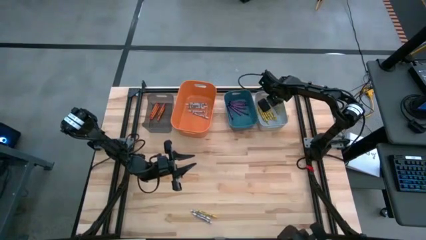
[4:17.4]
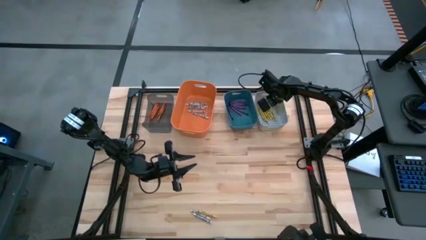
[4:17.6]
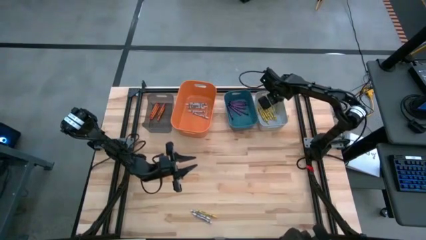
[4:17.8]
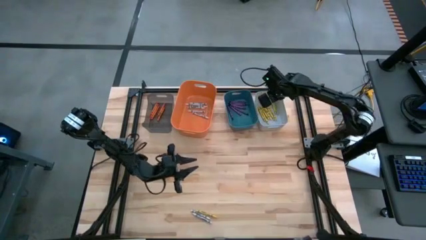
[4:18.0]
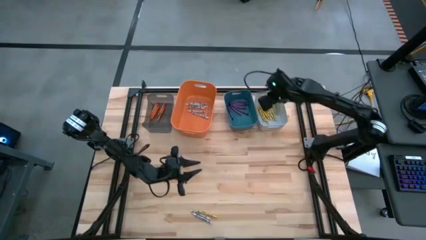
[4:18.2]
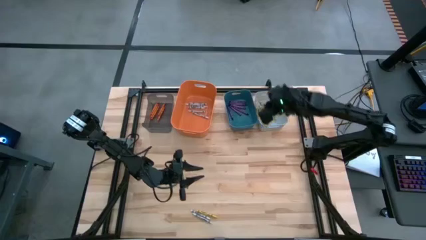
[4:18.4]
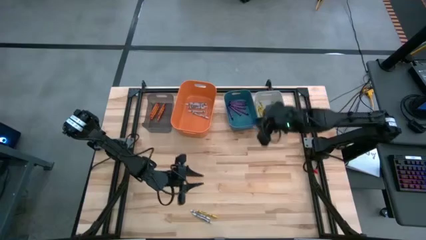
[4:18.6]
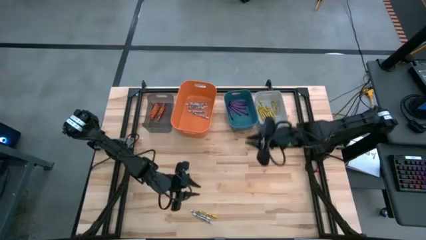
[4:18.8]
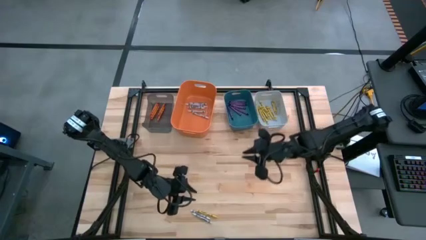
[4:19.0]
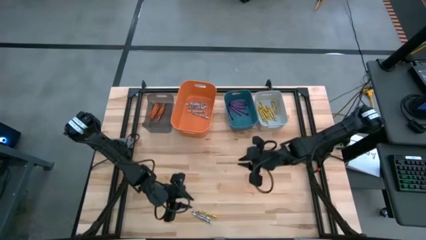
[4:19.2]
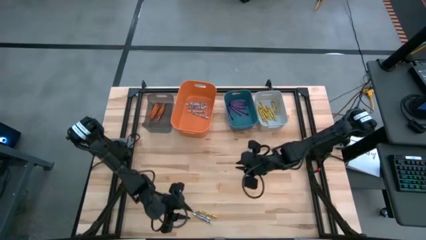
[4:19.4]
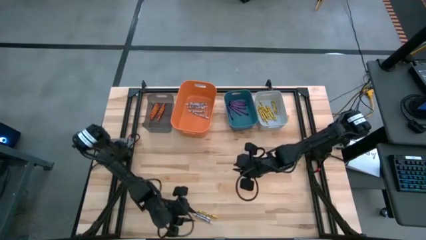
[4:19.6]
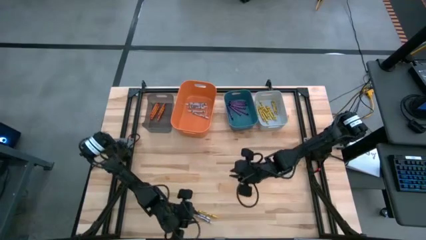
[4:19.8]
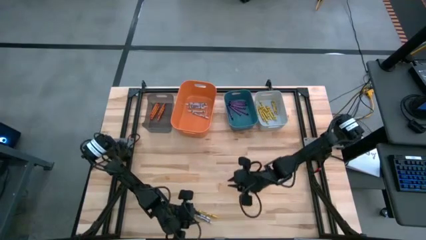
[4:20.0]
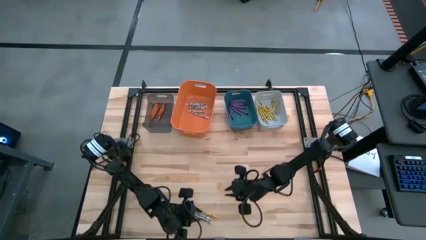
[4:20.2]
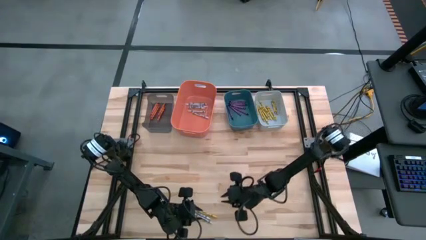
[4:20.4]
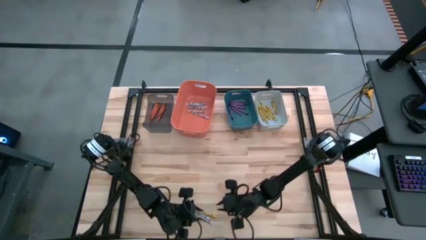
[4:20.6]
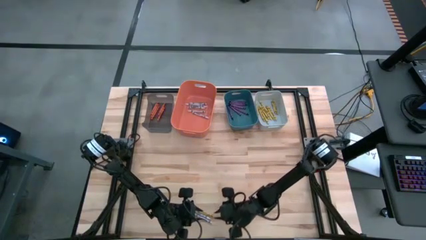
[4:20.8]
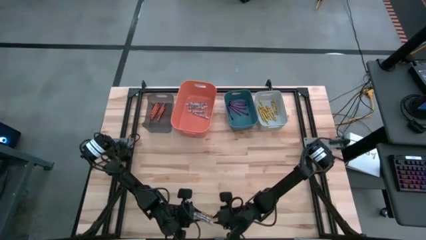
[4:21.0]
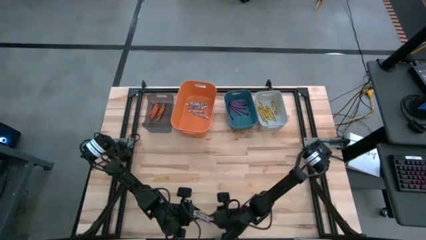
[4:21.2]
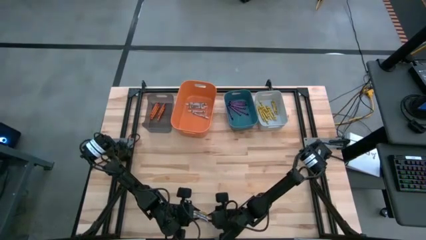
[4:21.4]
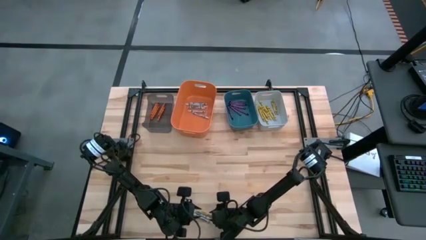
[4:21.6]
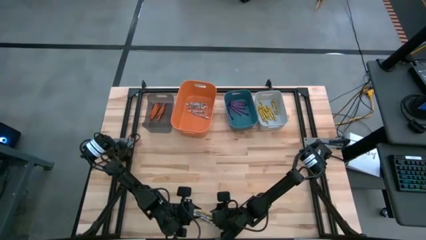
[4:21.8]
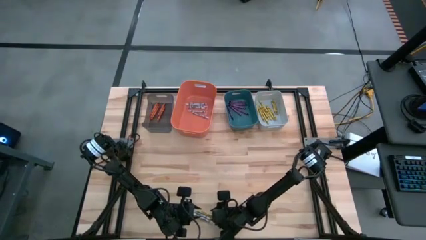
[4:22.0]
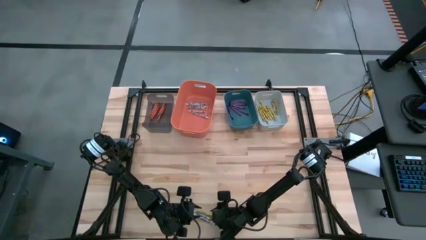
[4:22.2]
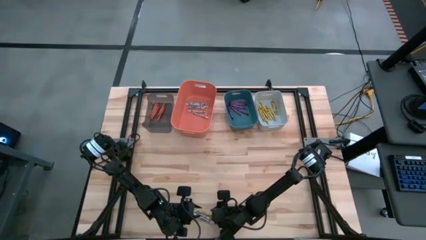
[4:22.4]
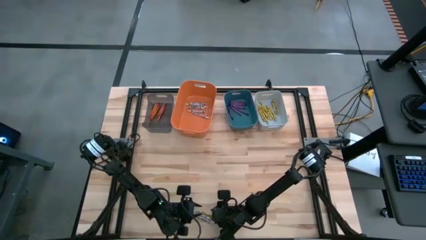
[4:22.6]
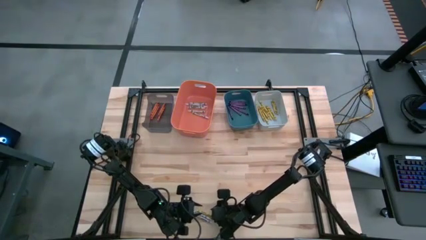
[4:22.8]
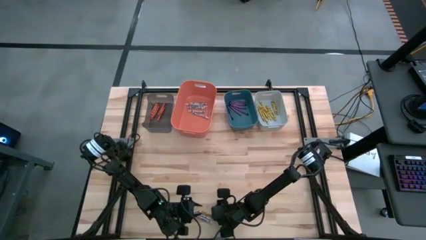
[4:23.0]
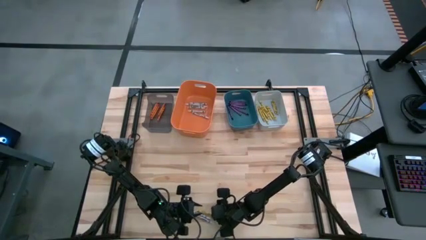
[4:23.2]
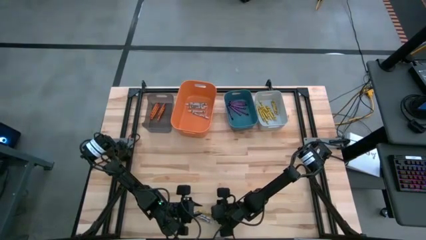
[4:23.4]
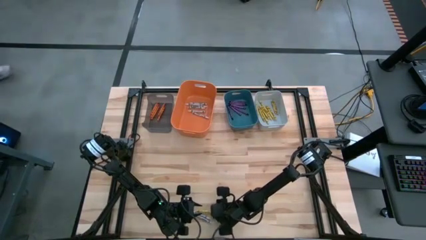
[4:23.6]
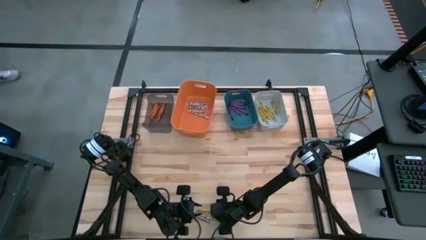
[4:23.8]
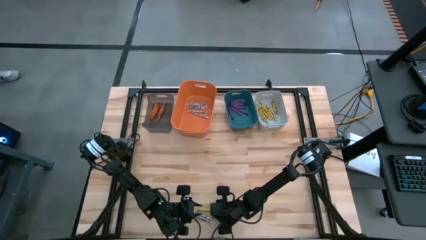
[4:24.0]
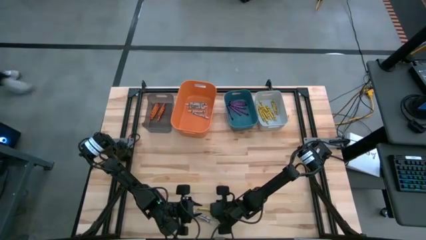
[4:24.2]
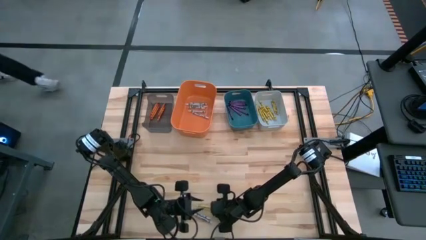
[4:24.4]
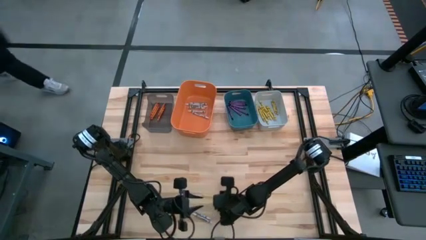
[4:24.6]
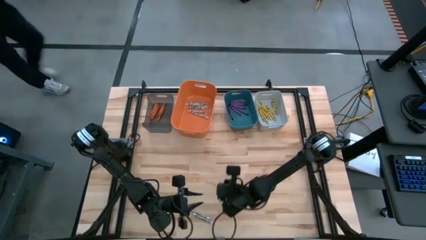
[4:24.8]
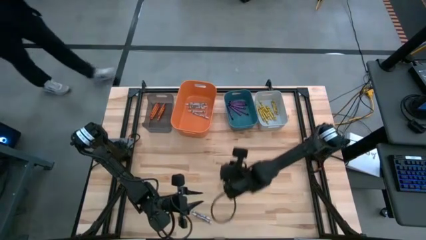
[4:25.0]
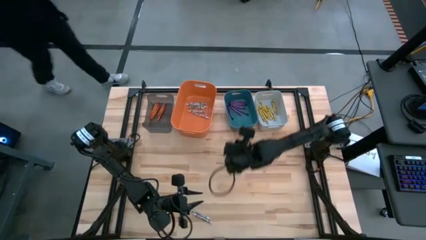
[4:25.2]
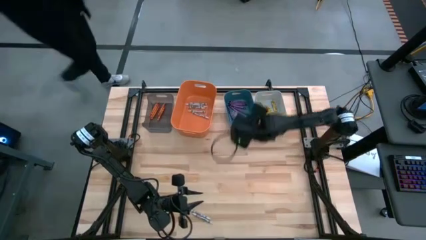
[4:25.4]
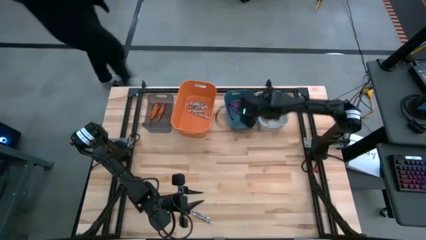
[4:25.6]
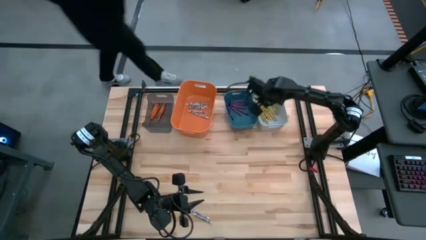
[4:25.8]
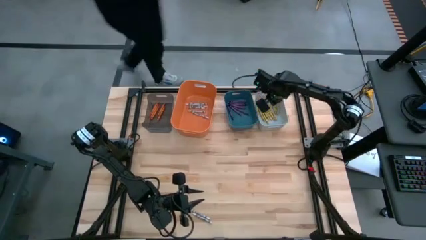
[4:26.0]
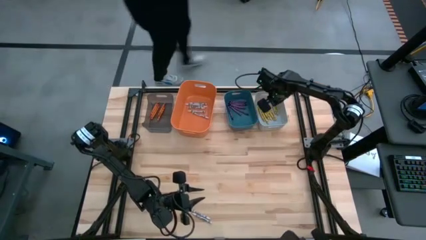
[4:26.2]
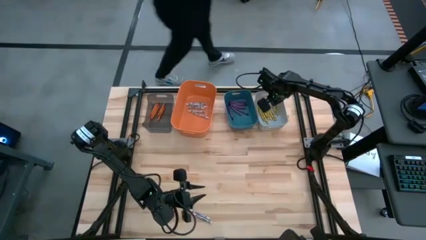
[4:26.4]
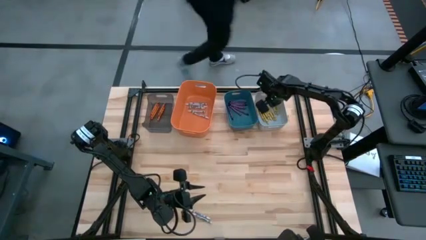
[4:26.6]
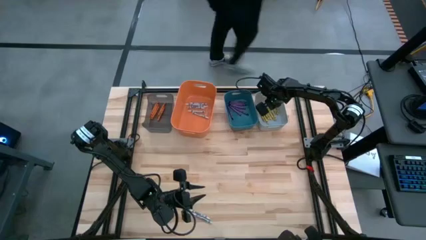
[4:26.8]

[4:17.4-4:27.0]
Task: Sort crayons
Put the yellow crayon into the white bin

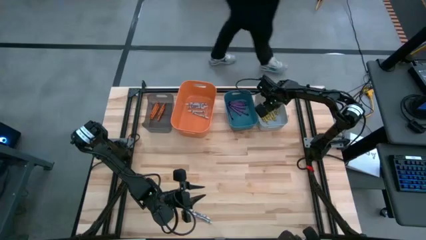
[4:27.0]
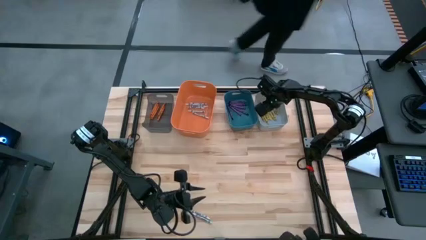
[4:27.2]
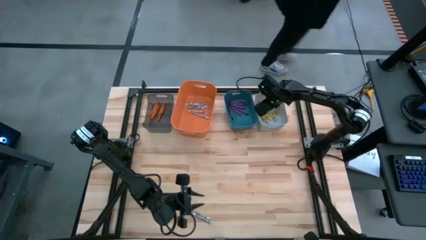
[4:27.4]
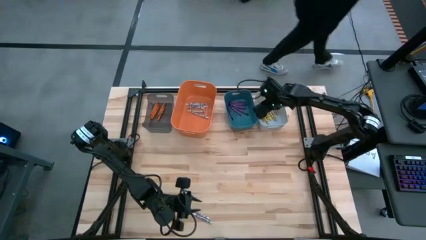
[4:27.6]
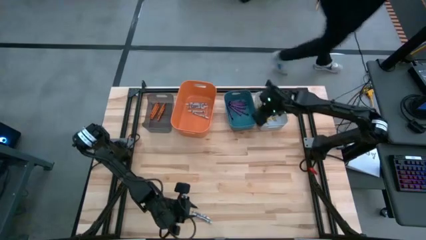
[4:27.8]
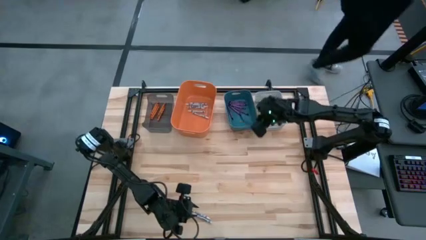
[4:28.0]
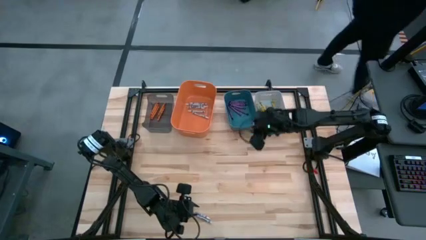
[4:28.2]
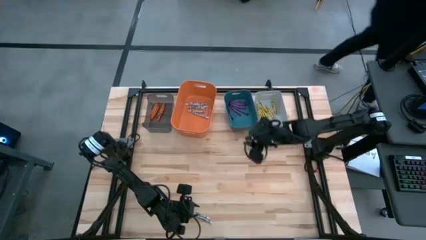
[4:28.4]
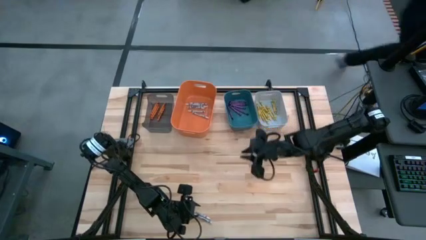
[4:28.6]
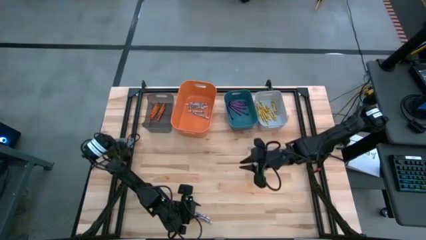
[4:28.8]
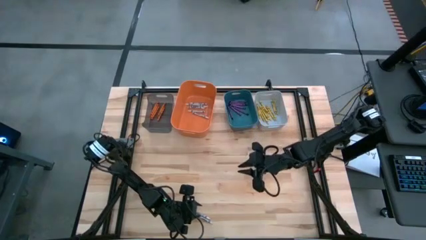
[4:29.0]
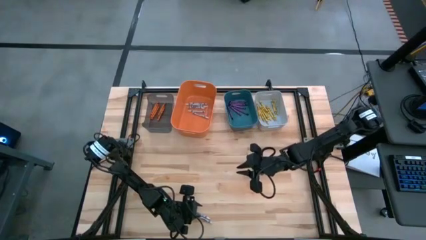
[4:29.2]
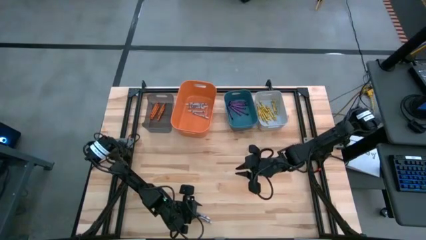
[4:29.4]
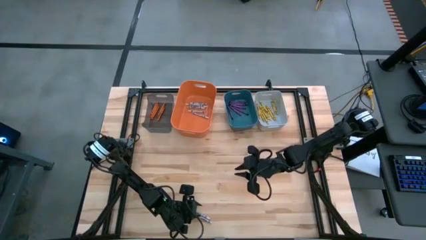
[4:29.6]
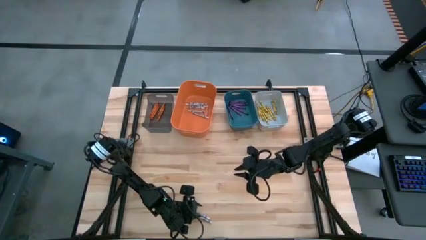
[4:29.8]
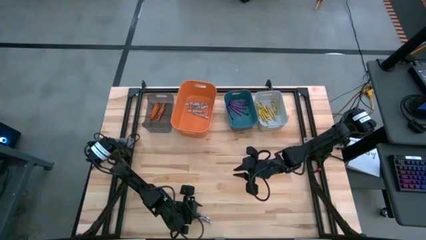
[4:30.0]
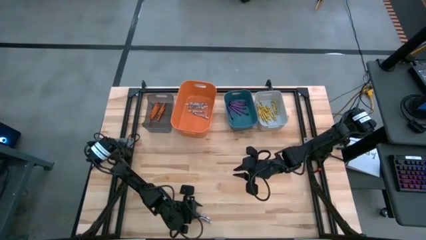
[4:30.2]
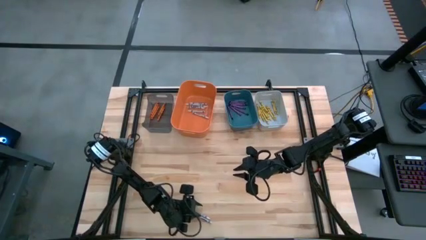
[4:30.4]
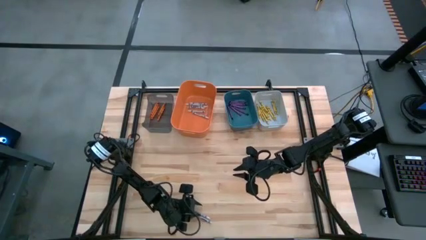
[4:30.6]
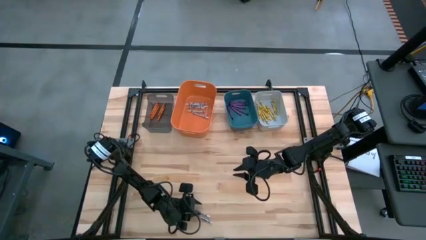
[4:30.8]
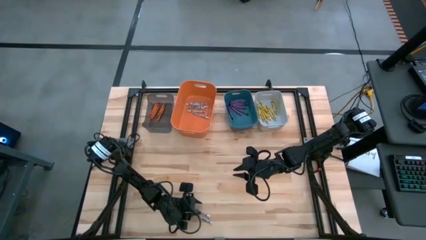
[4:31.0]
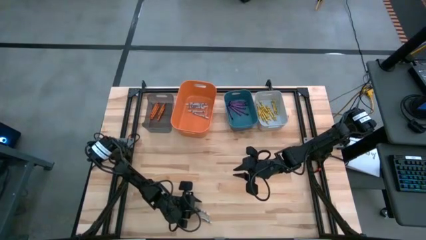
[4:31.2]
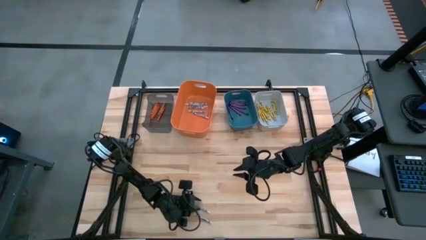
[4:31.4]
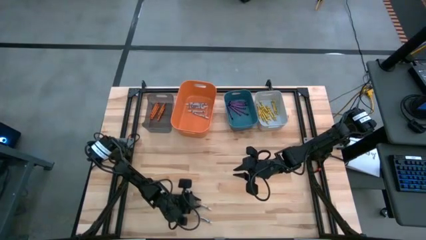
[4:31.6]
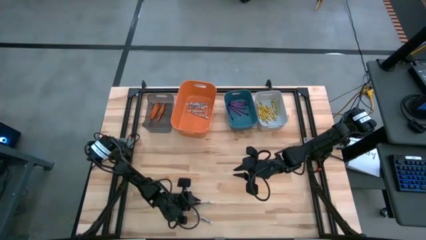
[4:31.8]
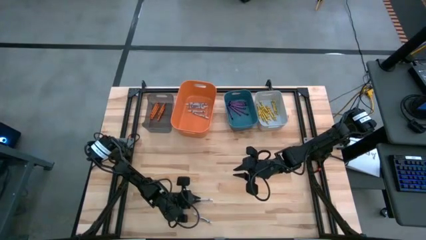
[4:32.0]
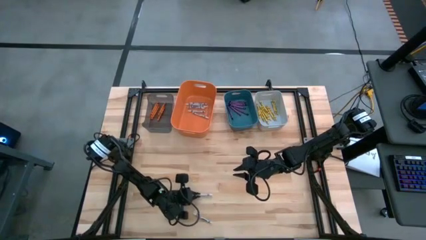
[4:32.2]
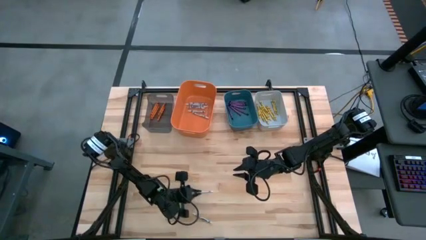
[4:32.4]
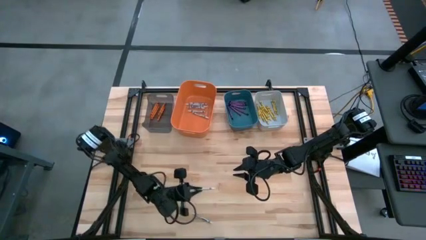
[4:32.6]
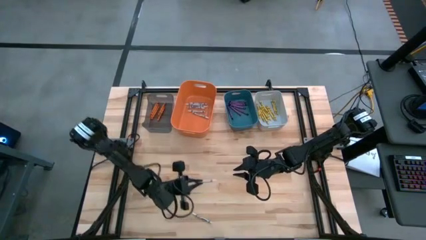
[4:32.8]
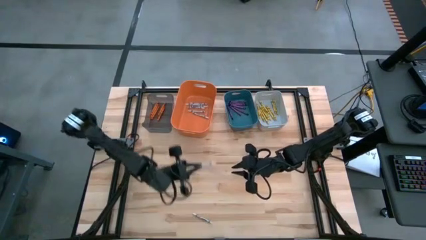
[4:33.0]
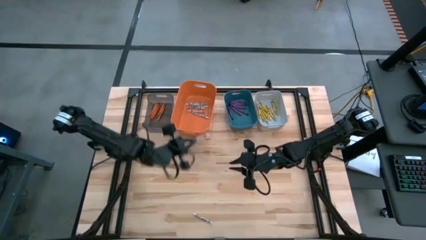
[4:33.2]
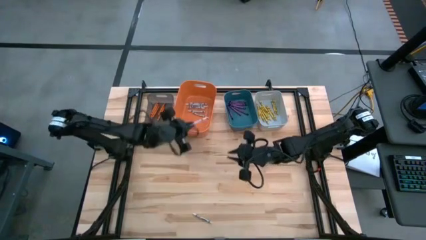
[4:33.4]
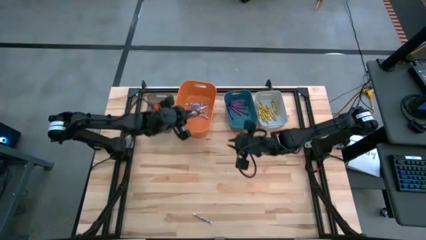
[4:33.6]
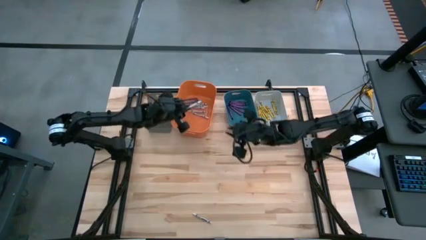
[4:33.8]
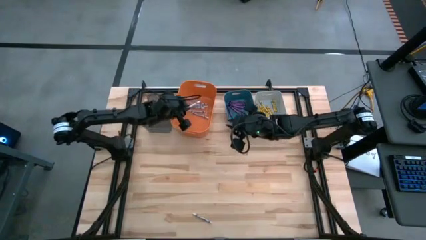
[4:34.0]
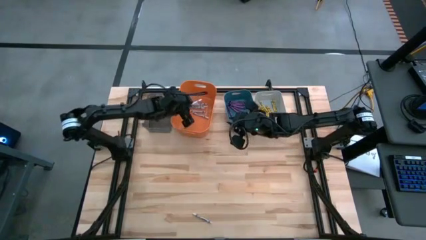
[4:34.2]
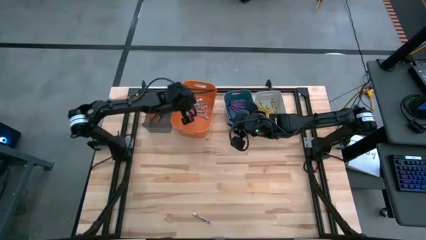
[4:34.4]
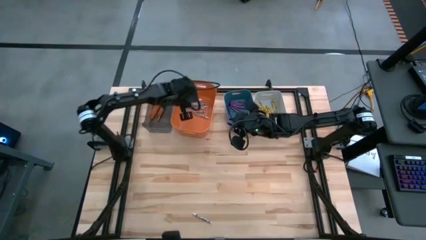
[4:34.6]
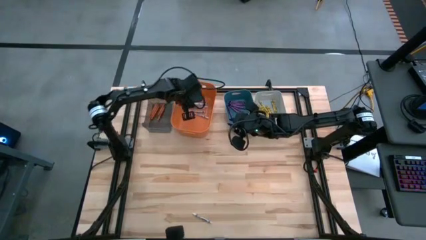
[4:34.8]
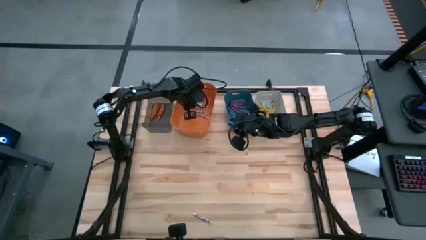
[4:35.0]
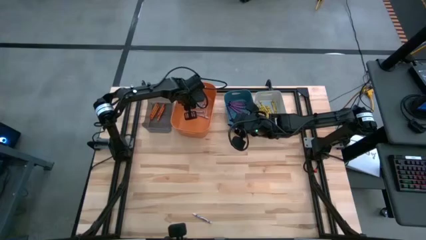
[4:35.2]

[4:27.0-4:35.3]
Put the white crayon into the orange bin
